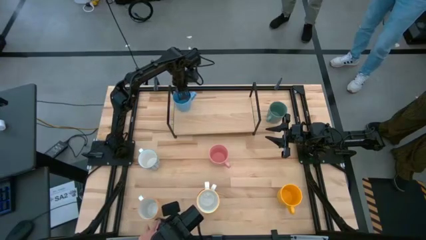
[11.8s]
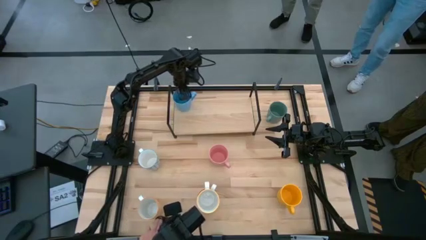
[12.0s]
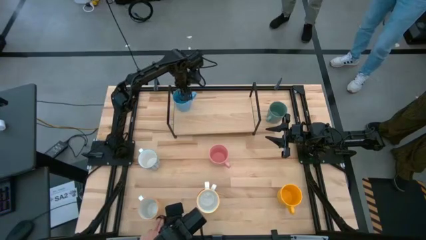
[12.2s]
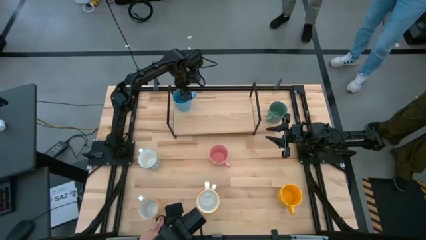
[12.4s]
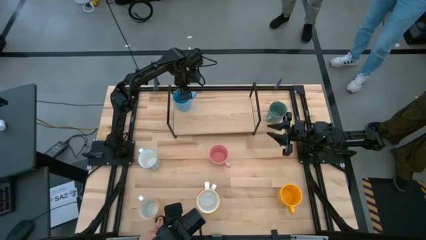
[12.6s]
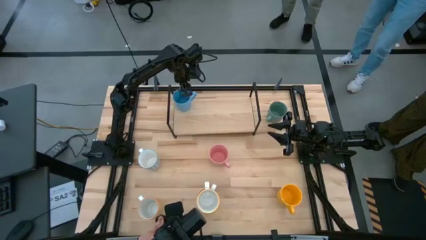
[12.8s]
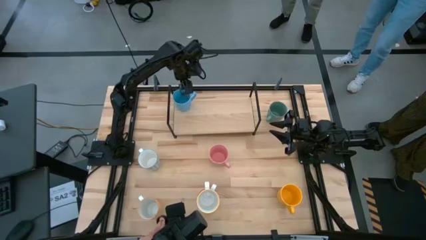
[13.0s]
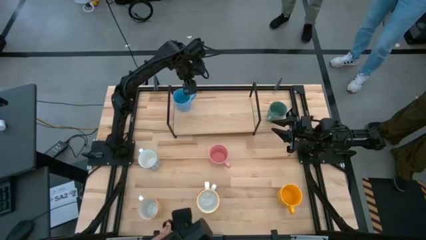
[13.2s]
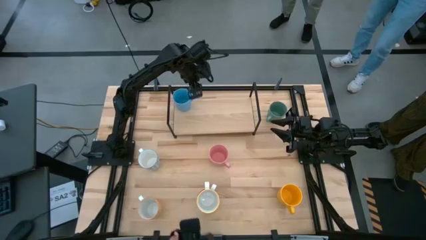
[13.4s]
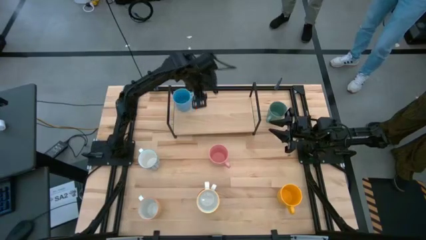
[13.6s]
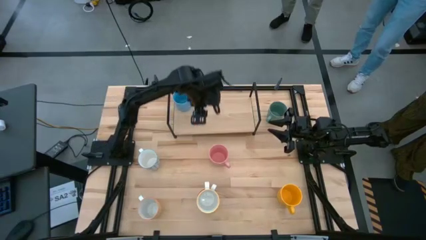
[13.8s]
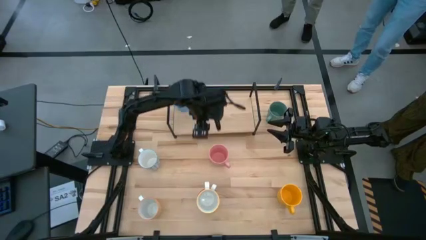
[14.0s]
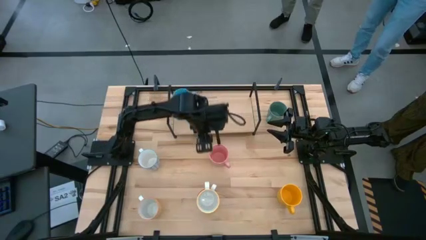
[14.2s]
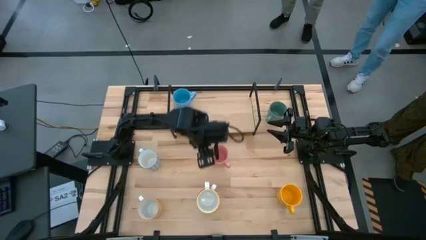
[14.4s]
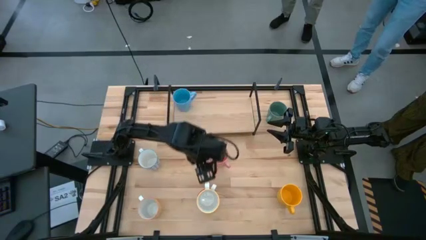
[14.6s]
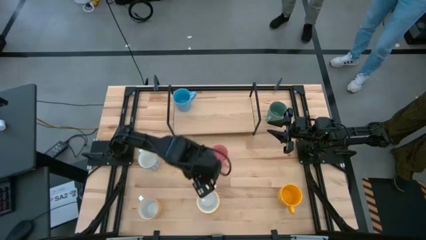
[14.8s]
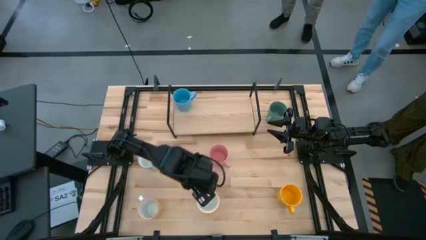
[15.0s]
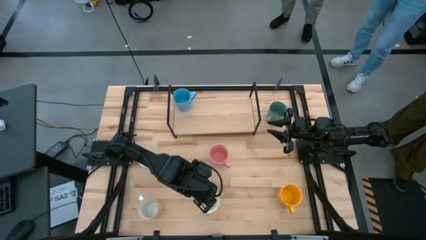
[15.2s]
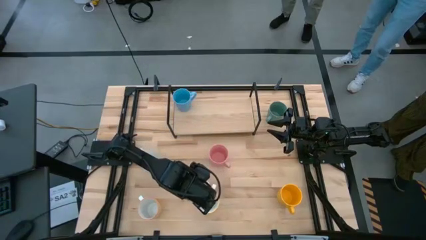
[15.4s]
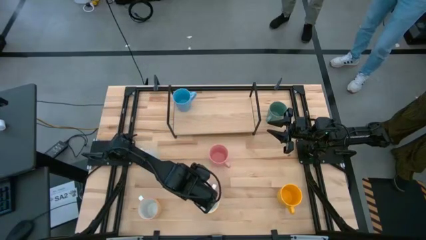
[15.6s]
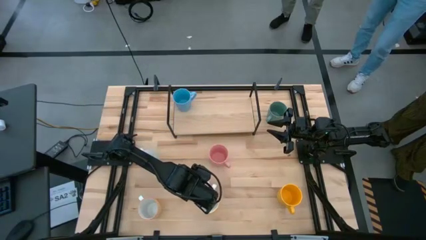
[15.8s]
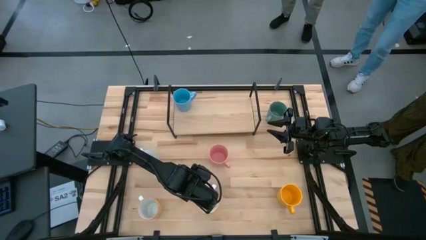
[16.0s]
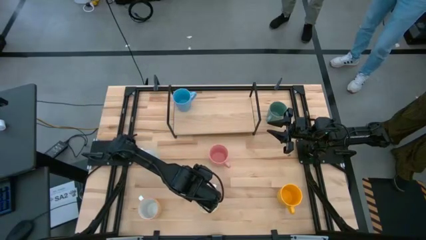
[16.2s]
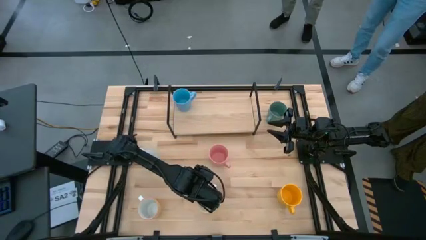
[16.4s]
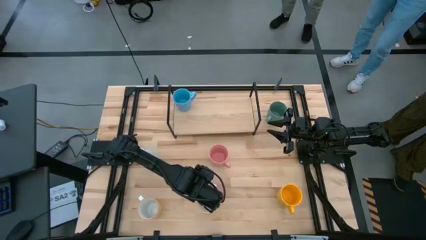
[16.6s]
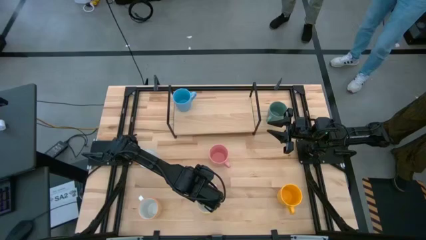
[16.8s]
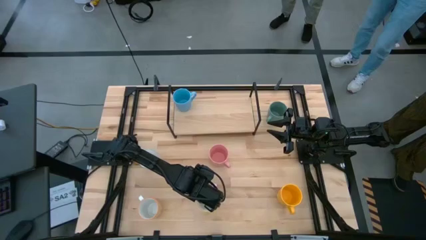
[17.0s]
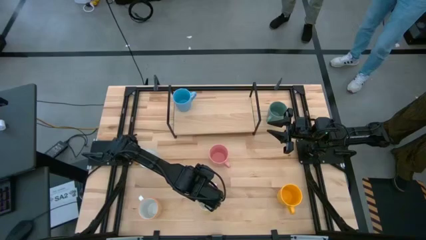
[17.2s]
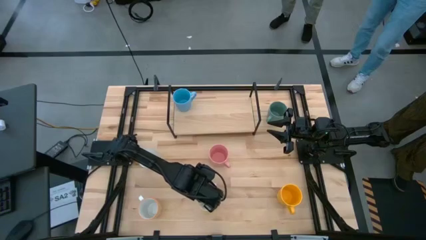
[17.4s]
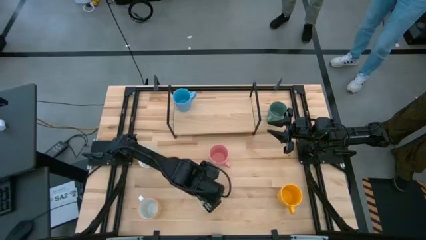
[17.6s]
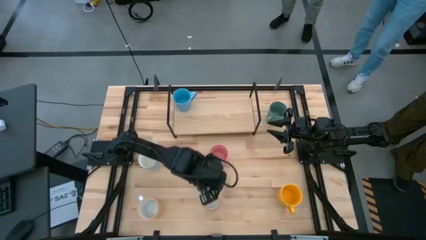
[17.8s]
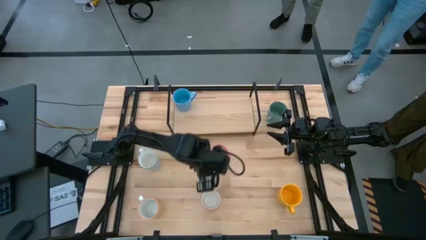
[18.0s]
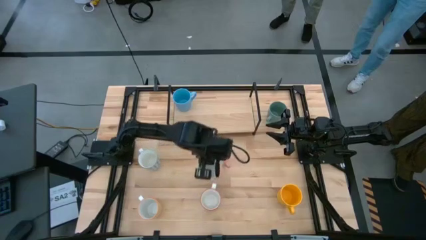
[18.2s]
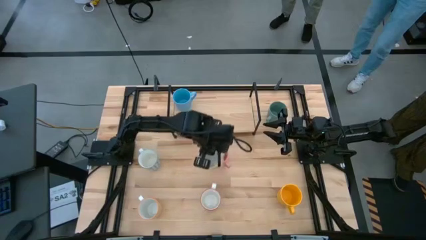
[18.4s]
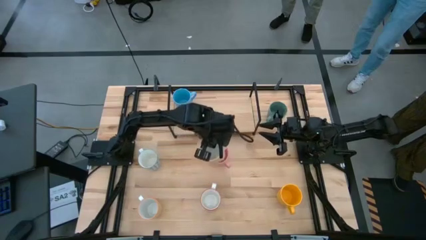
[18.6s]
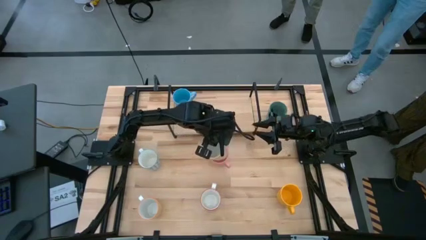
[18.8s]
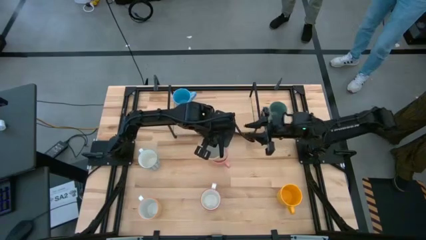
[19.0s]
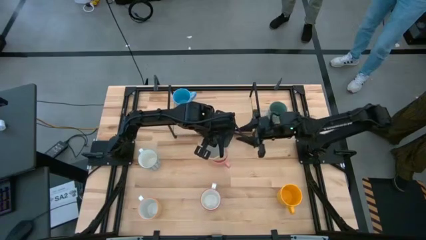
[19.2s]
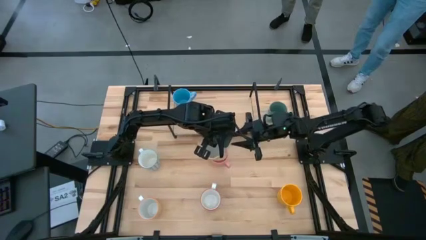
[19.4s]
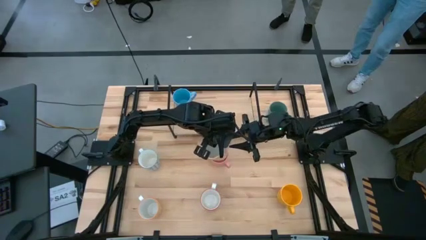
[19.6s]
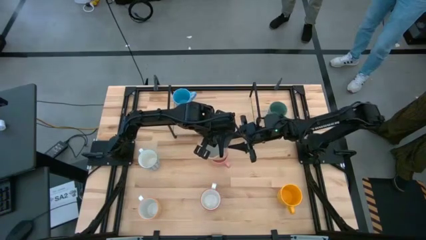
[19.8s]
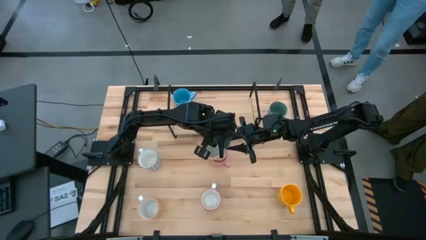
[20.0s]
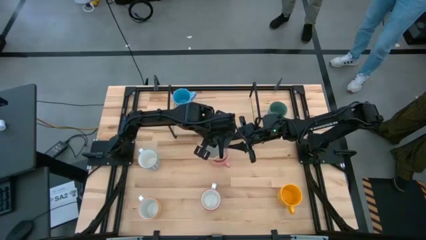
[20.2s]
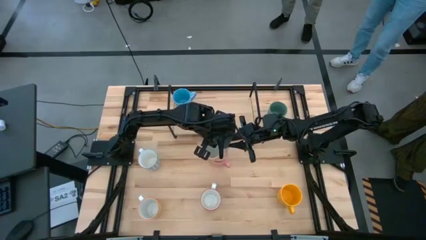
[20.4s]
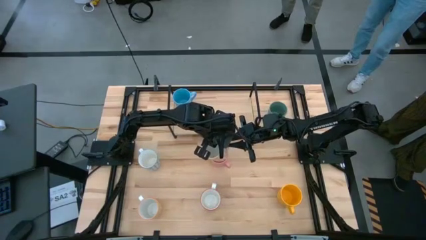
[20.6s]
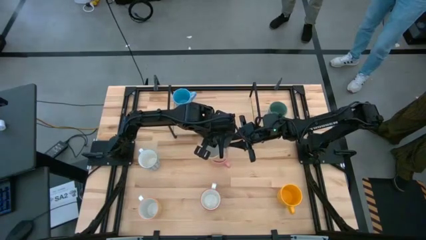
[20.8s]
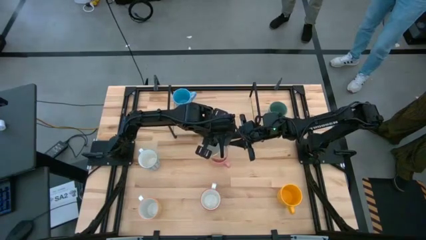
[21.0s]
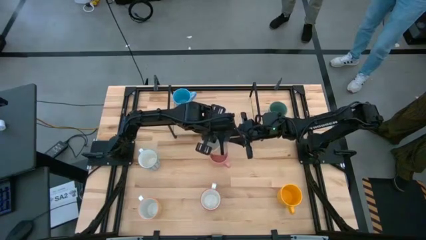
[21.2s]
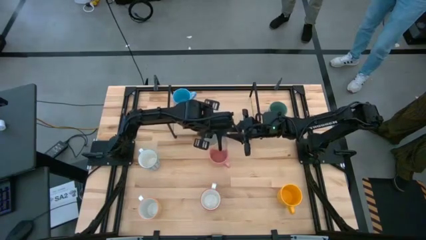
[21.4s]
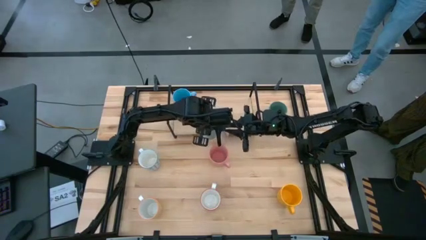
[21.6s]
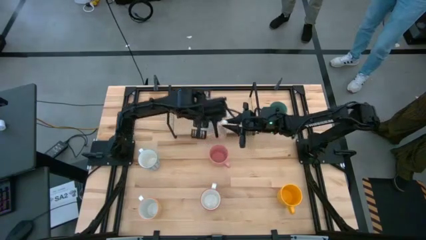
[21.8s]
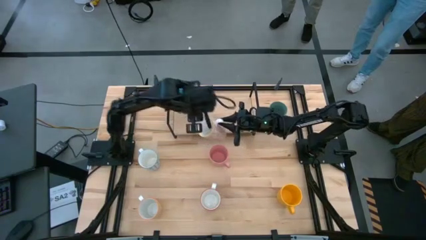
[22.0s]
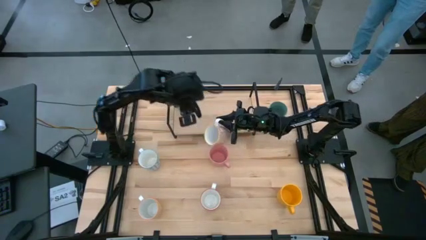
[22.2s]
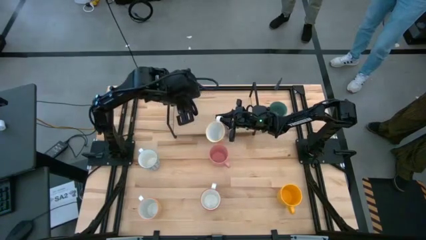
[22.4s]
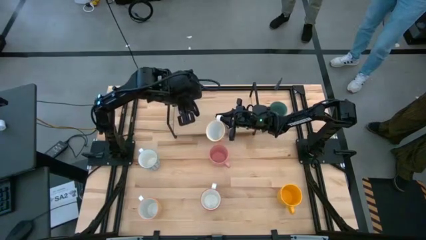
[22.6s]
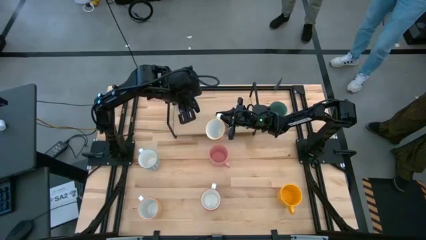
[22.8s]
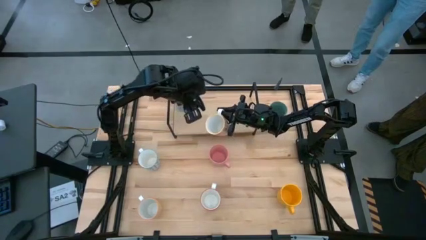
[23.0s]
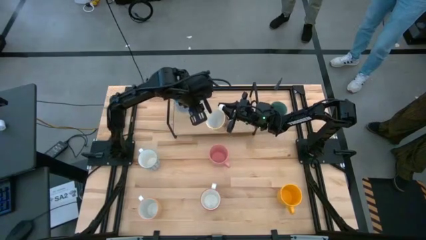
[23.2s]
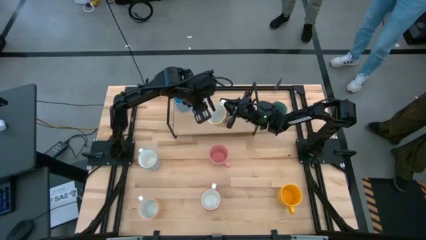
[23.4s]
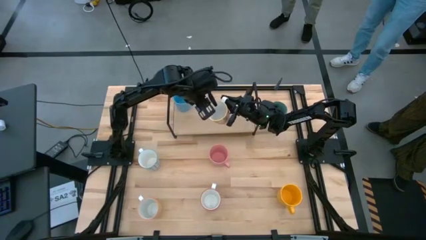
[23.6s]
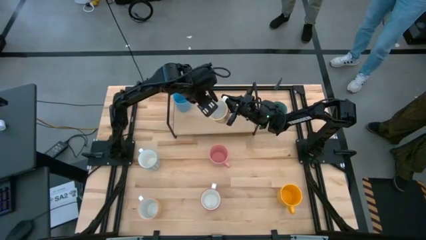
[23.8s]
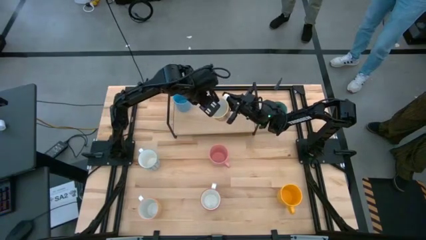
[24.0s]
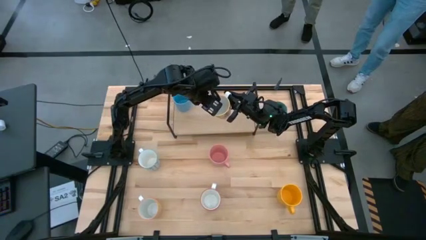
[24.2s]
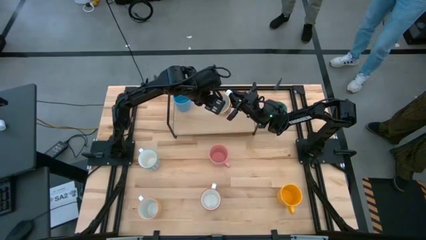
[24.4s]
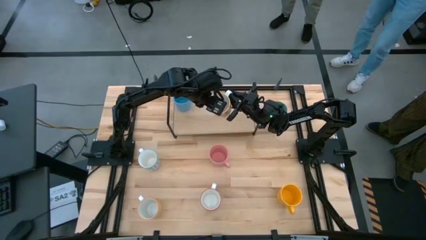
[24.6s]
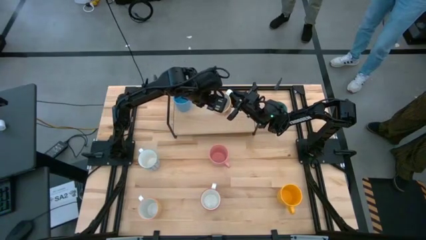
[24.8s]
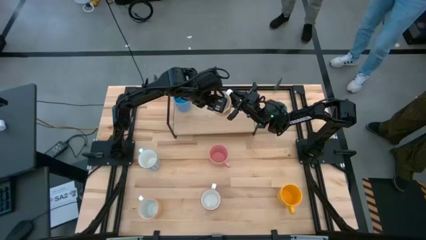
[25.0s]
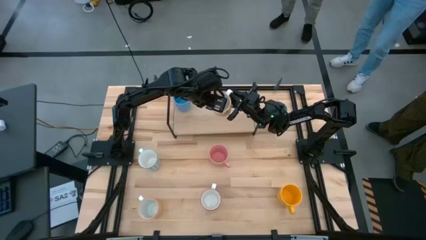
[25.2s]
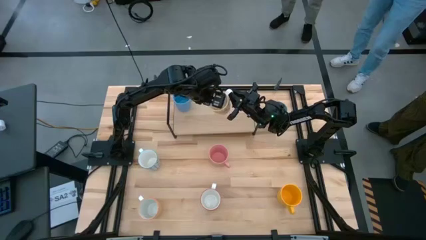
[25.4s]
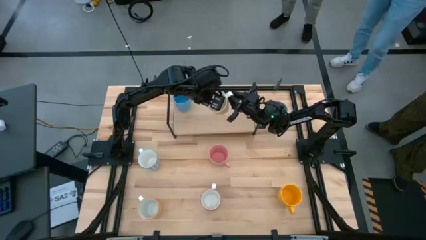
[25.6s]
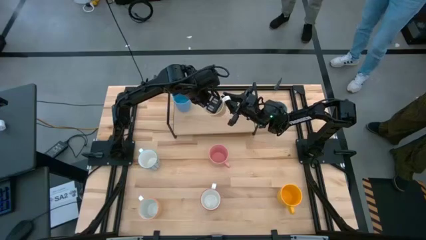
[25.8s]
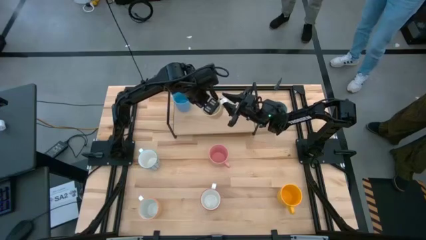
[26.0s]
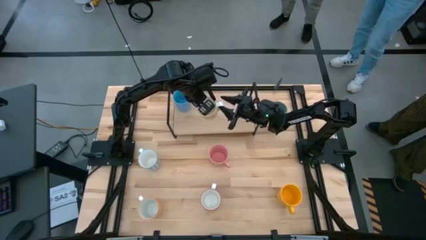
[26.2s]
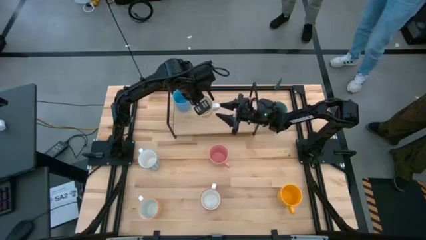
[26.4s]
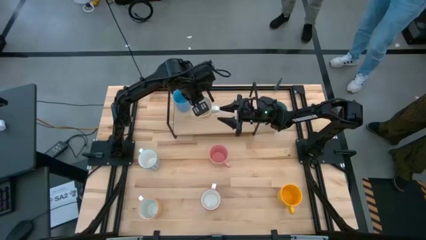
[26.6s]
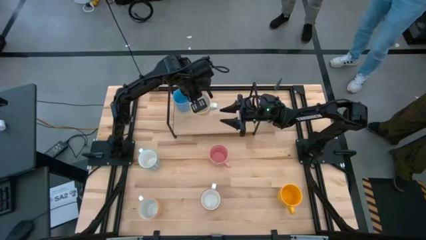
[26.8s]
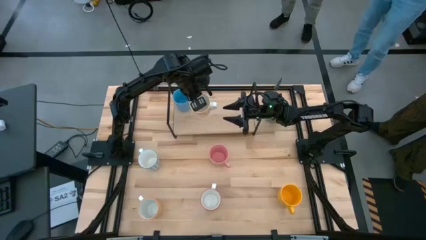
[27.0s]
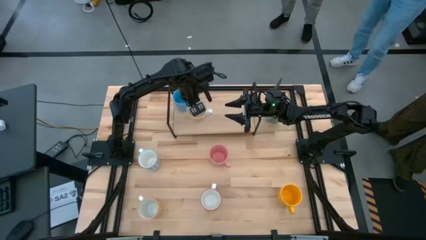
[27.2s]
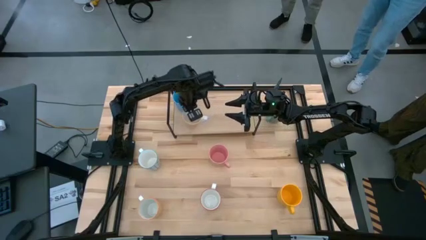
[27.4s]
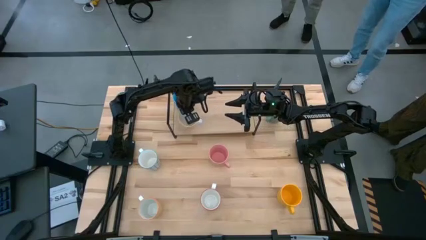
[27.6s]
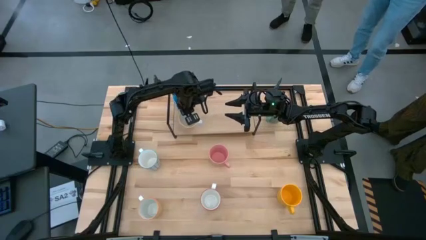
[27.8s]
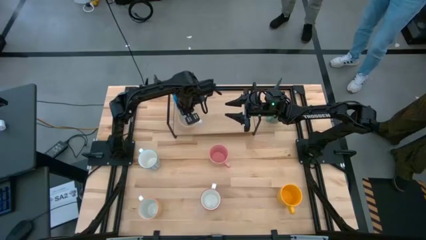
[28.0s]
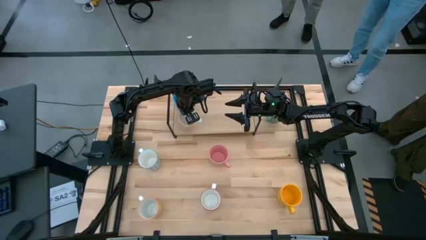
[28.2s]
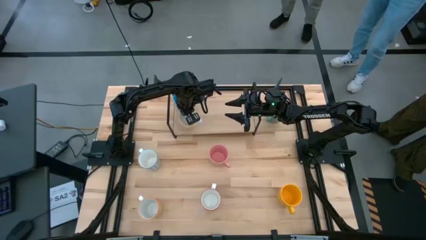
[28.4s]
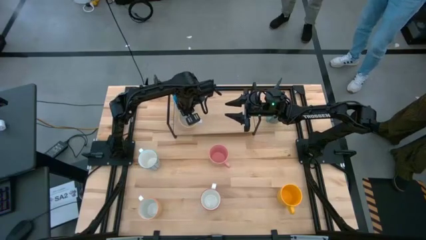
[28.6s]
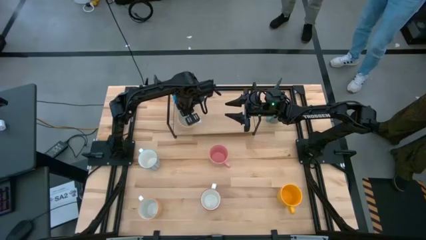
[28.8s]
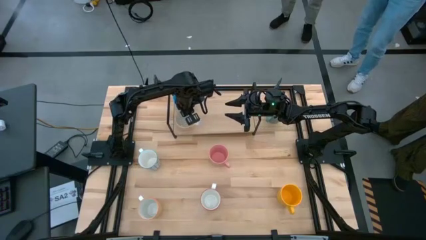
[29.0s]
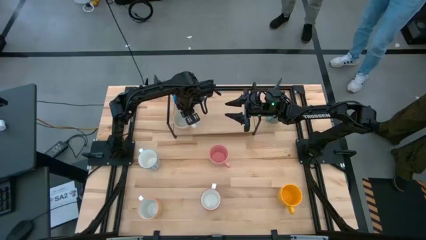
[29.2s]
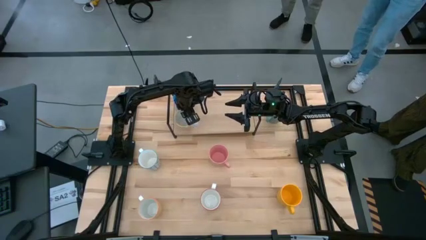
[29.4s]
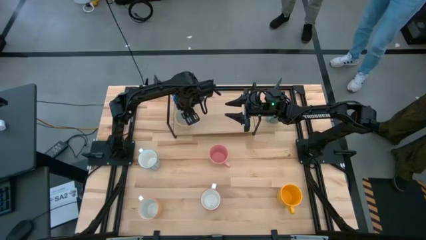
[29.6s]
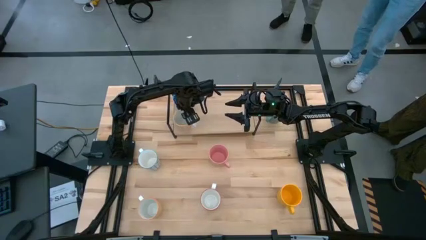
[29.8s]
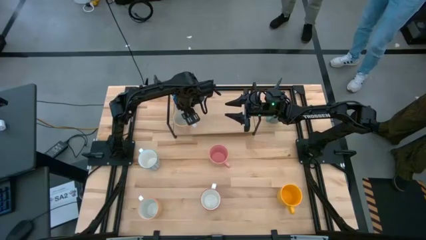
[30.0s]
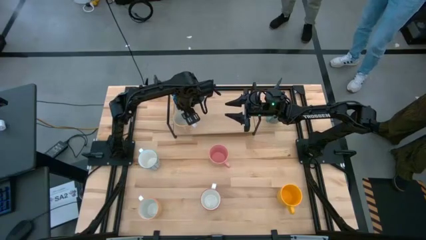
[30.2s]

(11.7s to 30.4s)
Task: Place coffee mugs
Put the orange patterned mug on the shelf
